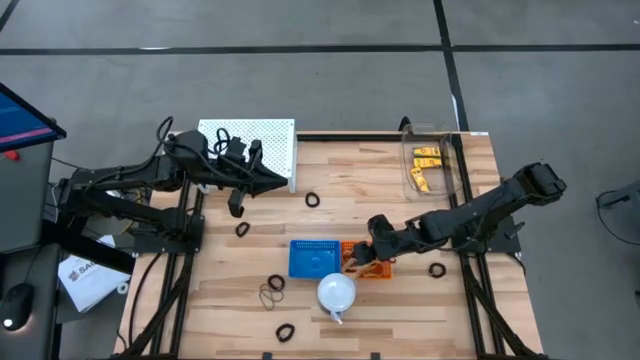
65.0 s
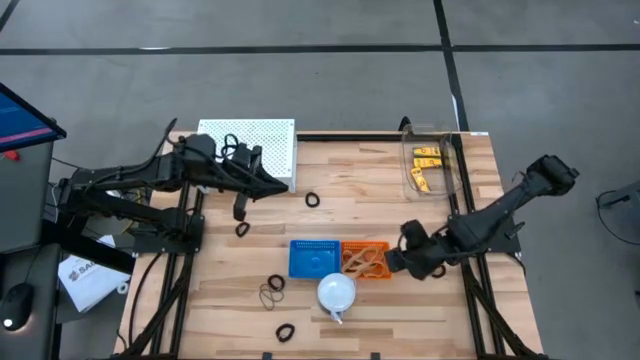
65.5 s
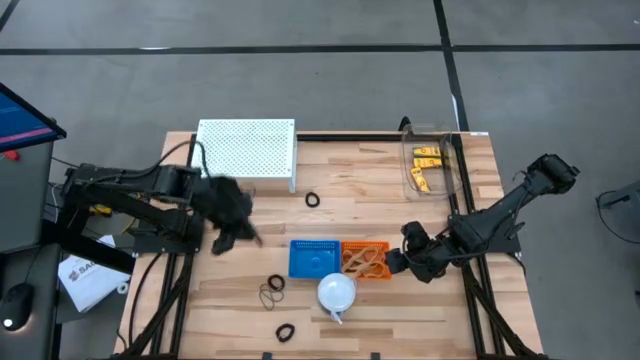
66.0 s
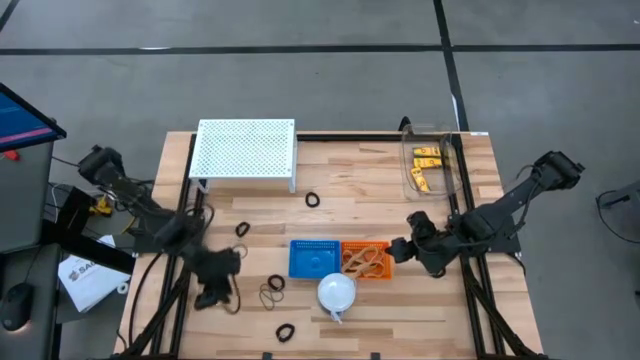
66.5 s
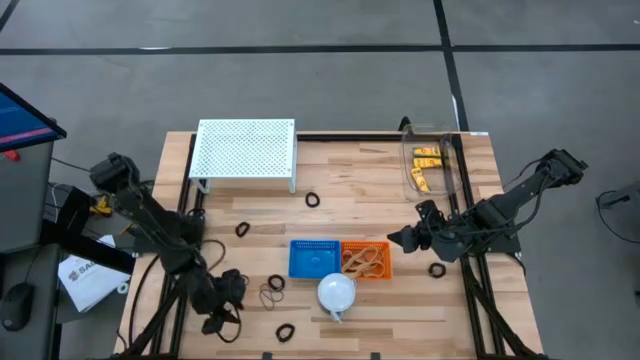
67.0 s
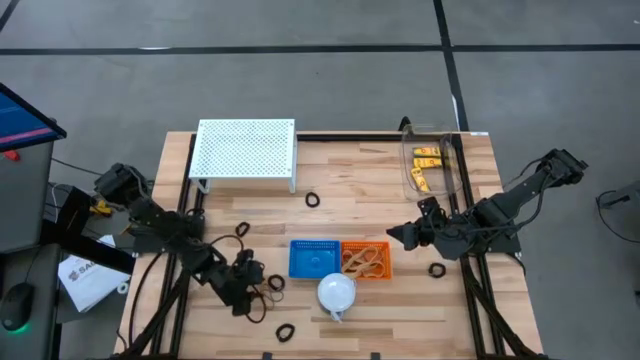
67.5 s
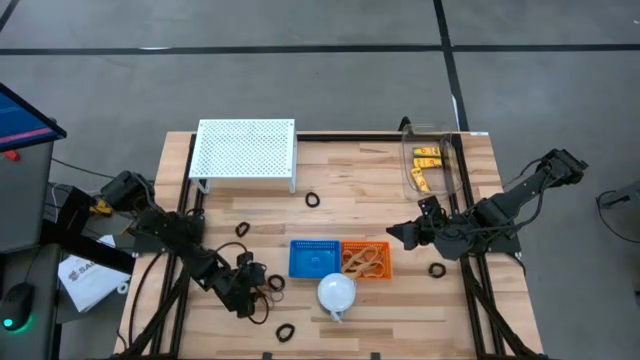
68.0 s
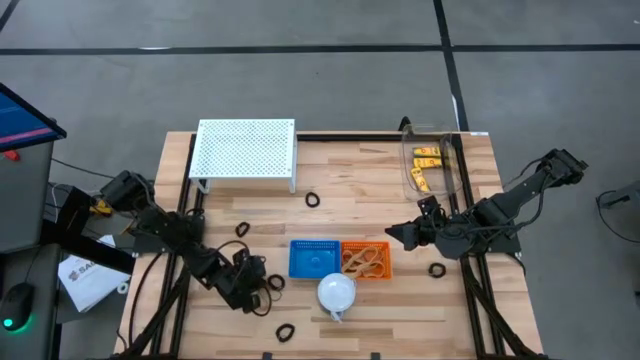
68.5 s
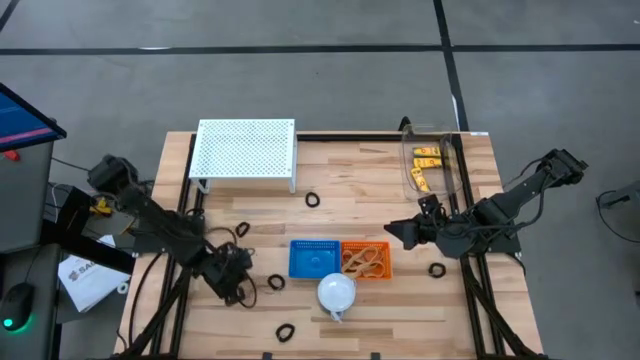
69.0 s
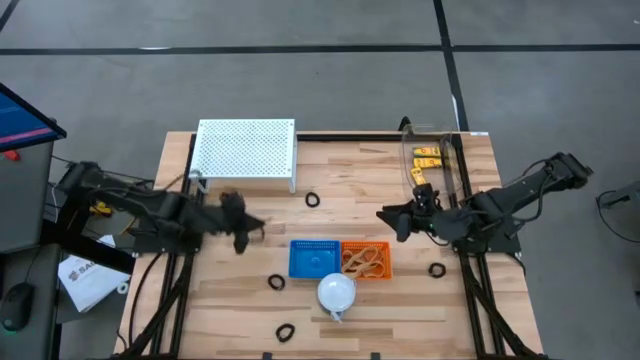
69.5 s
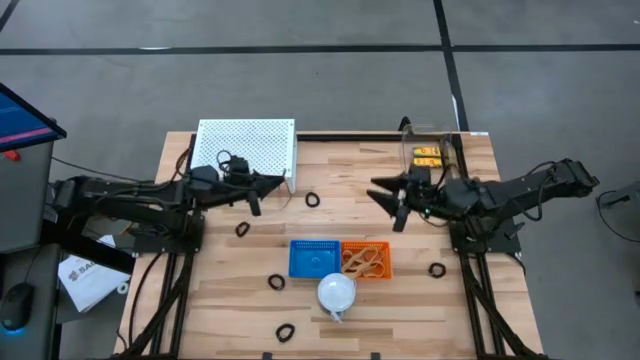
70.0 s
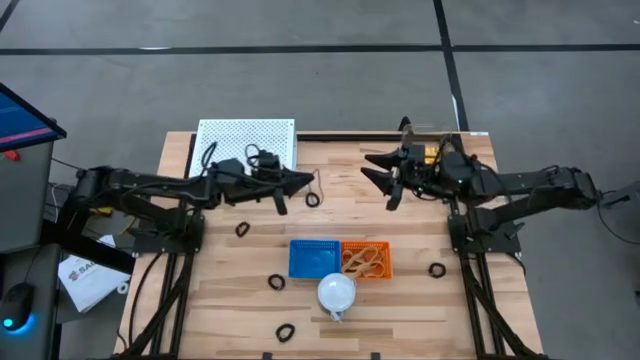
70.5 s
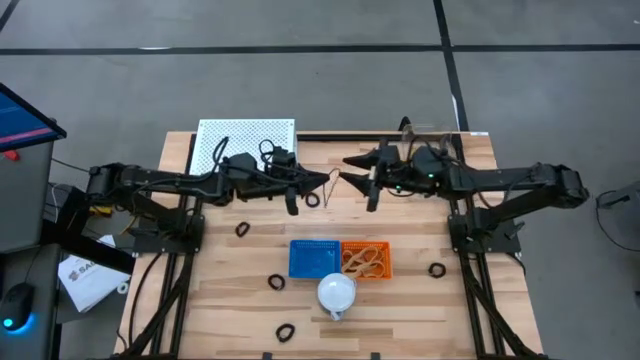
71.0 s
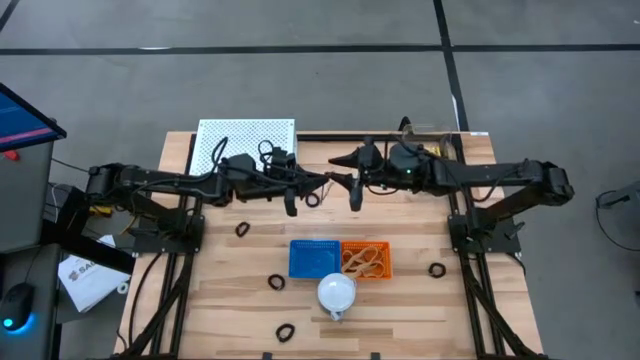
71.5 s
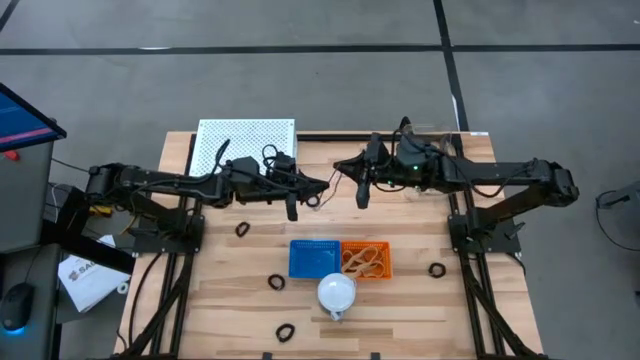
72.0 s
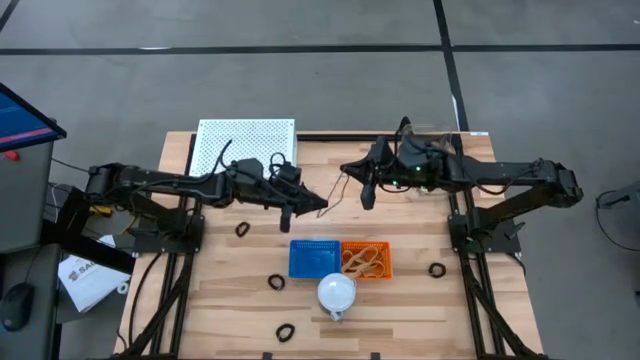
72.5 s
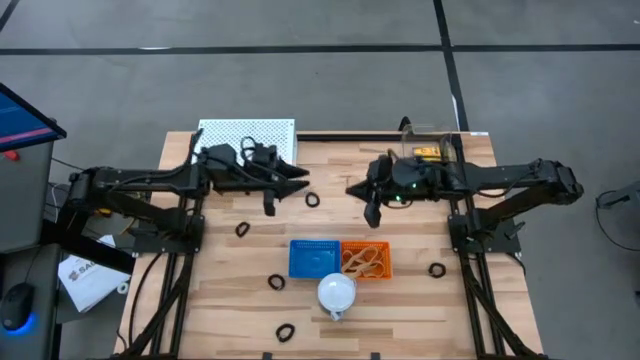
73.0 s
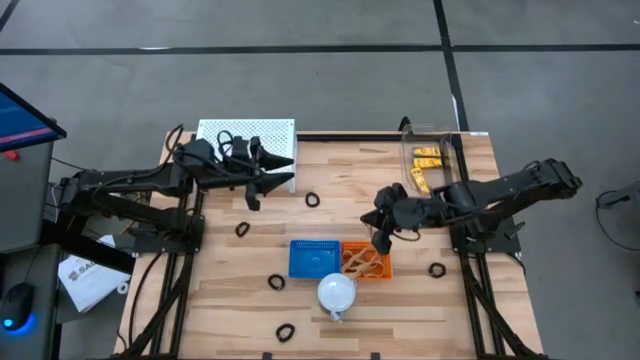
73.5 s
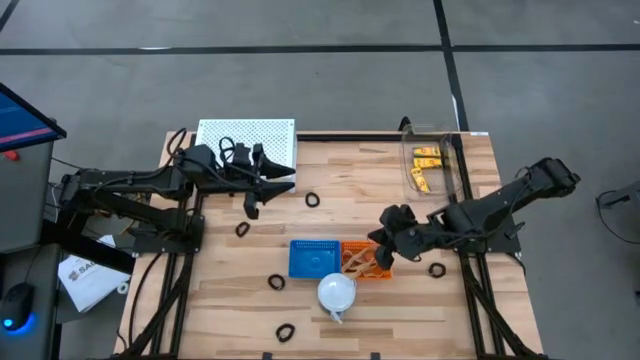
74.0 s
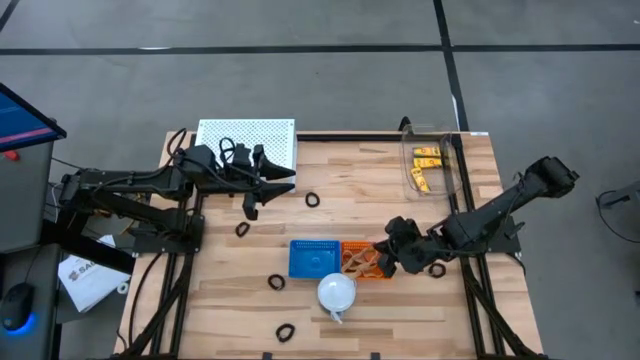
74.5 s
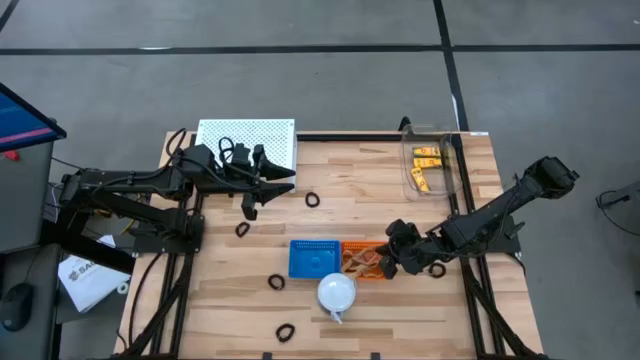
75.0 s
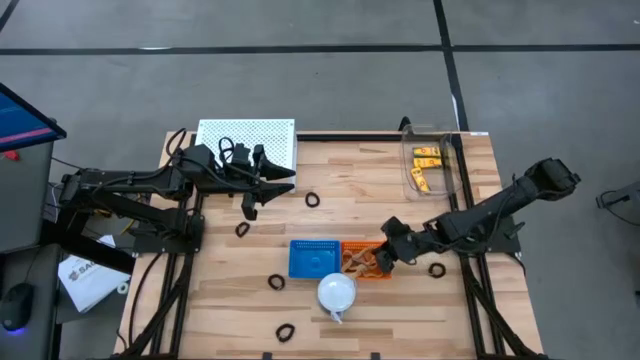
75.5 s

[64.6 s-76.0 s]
Task: Pick & Place Office Desk Supplies
Put the black rubber band into the orange basket

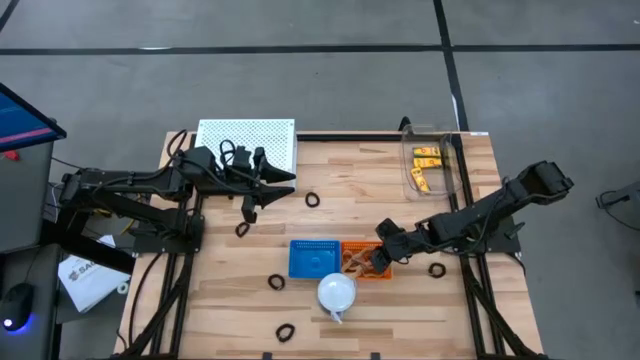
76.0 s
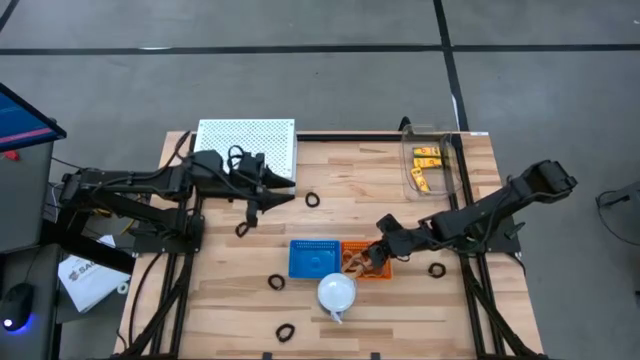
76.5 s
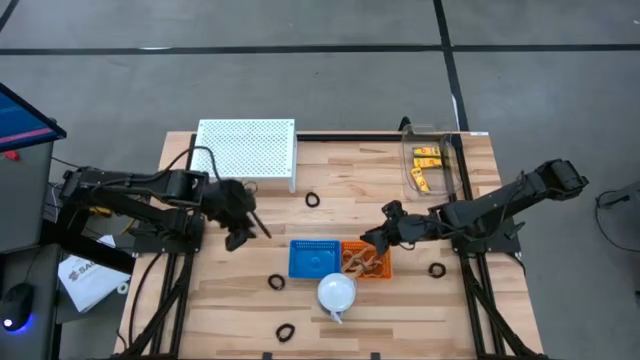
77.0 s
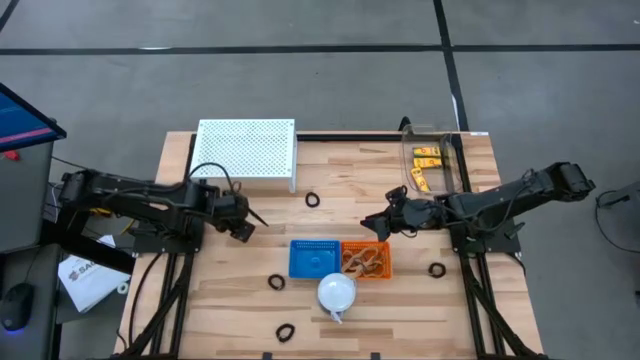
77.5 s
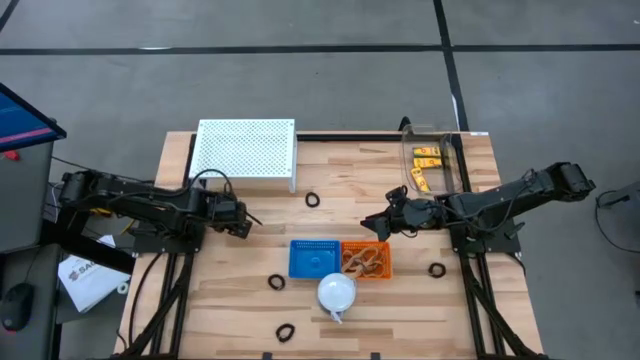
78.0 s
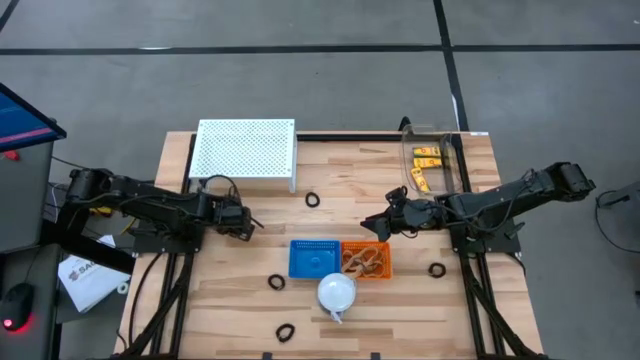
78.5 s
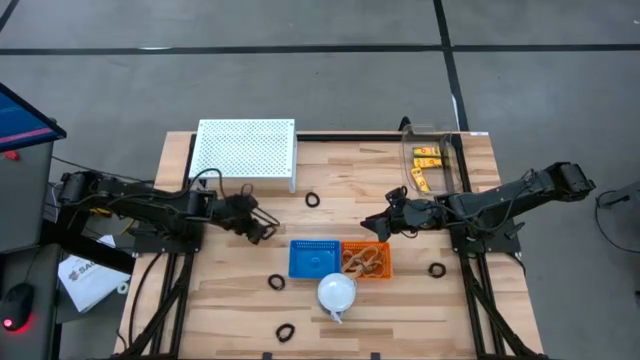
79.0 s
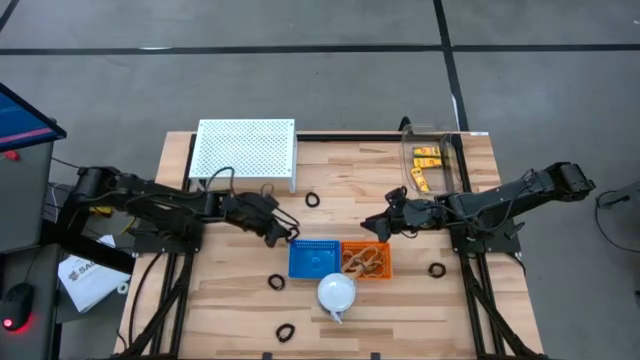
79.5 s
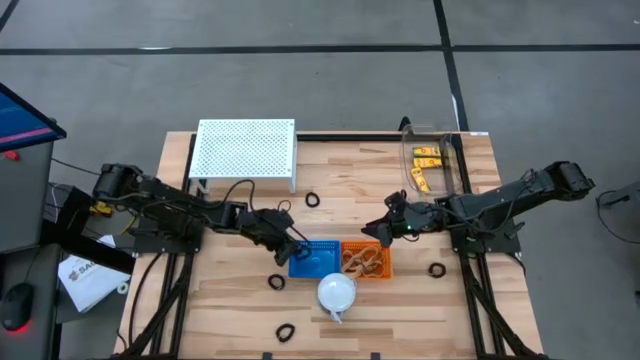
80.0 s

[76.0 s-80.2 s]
Put the black spring keychain into the blue basket

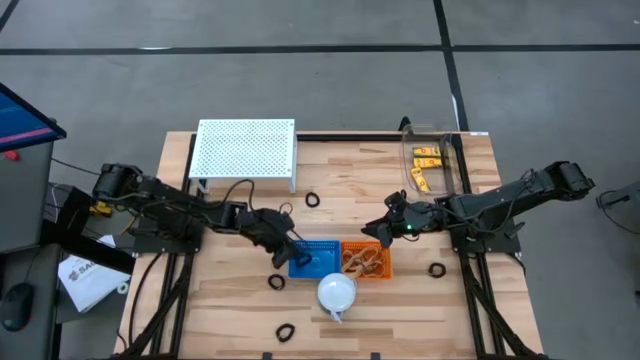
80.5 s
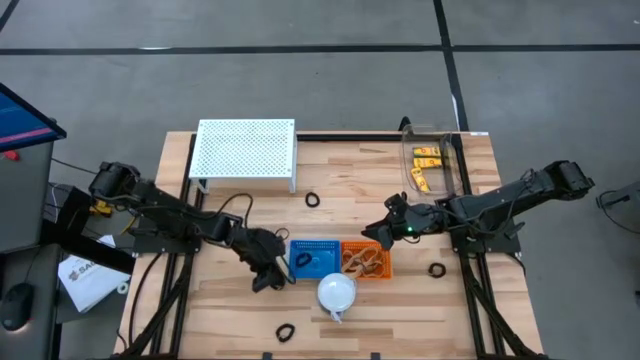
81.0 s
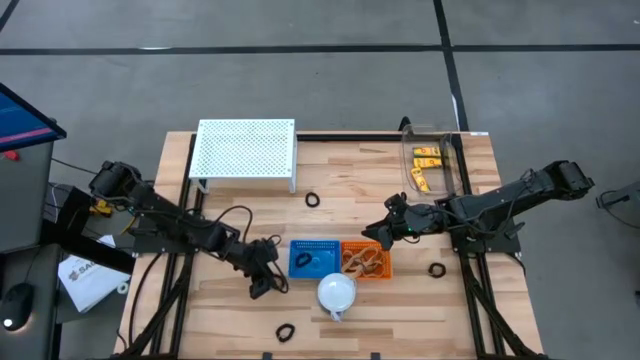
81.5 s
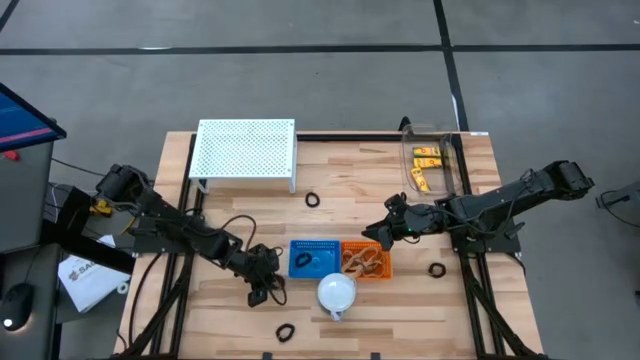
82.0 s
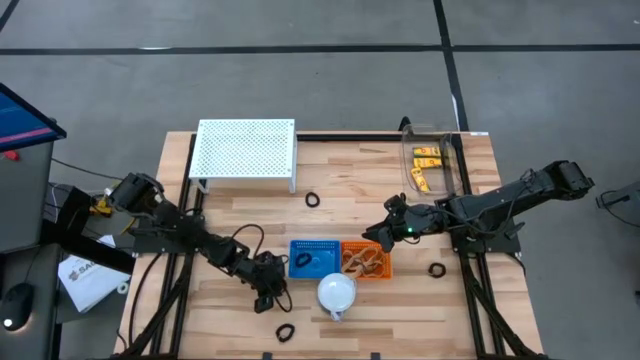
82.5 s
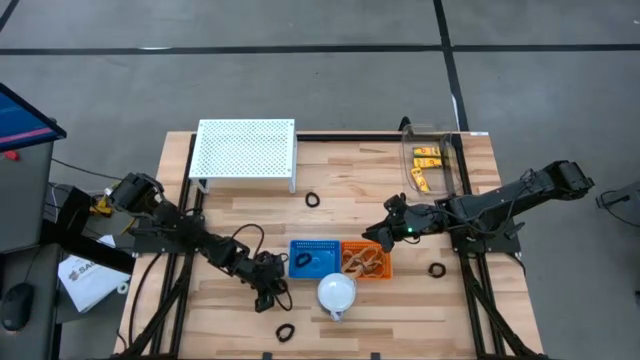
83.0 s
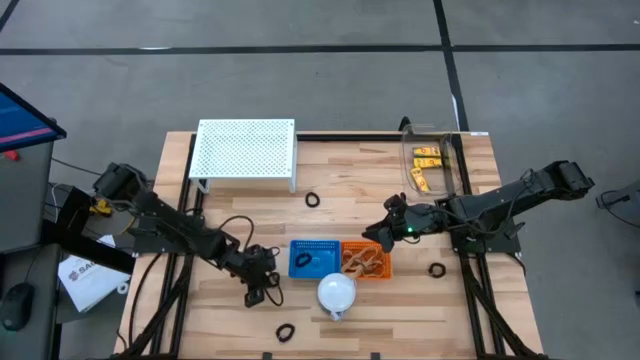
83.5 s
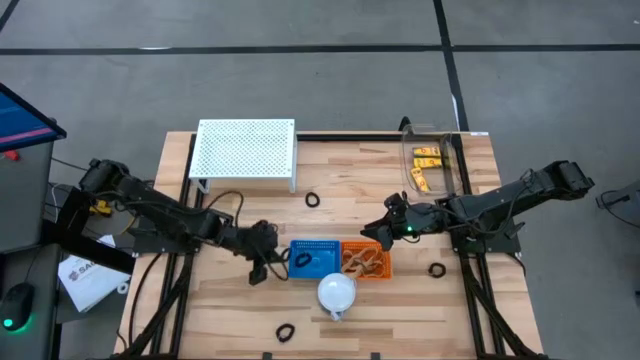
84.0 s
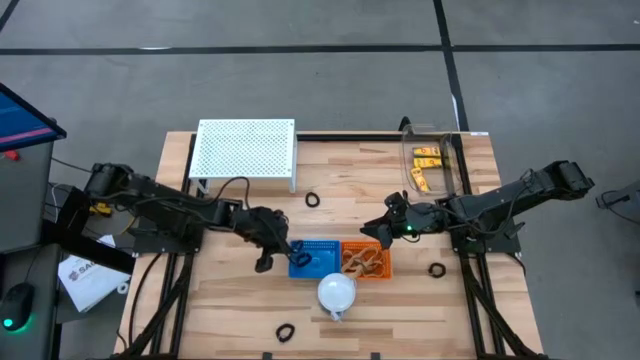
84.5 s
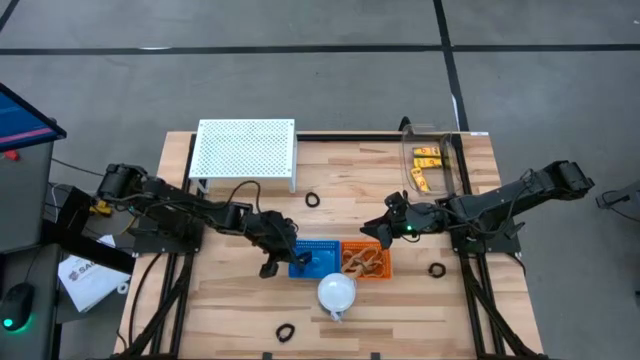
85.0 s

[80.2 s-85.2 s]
Put the black spring keychain into the blue basket
